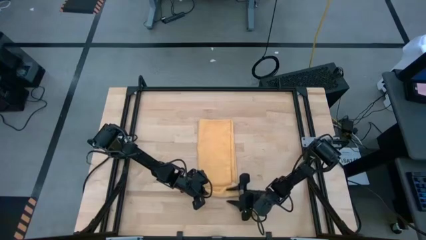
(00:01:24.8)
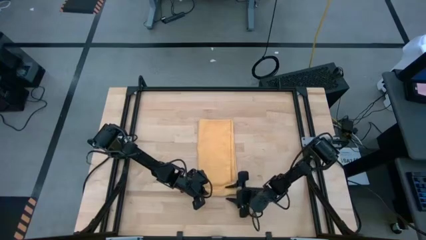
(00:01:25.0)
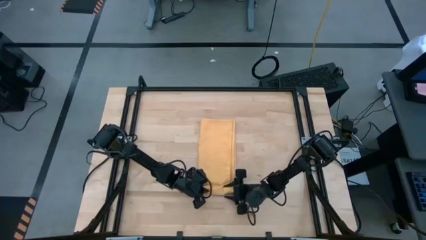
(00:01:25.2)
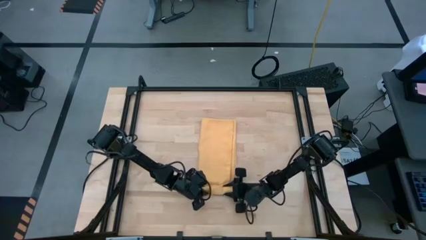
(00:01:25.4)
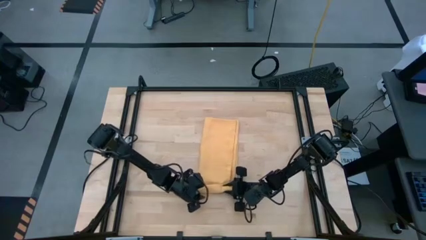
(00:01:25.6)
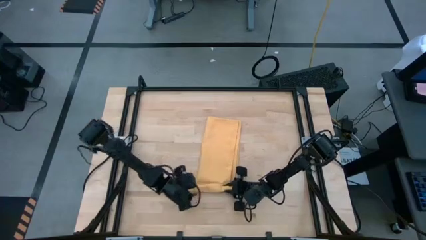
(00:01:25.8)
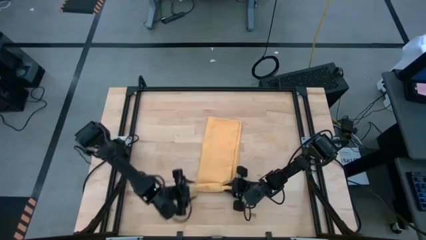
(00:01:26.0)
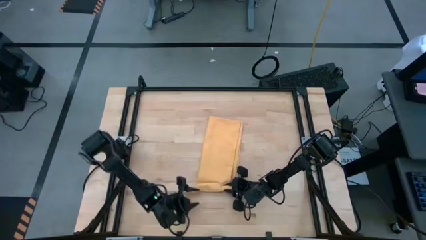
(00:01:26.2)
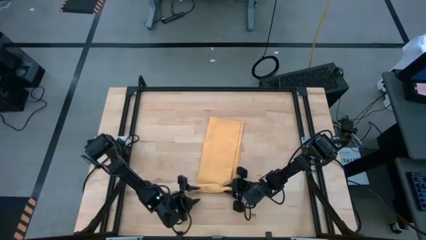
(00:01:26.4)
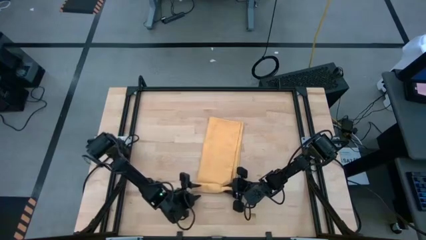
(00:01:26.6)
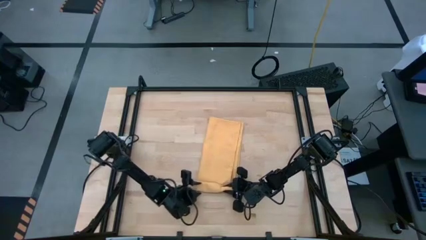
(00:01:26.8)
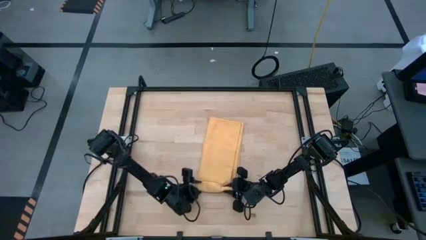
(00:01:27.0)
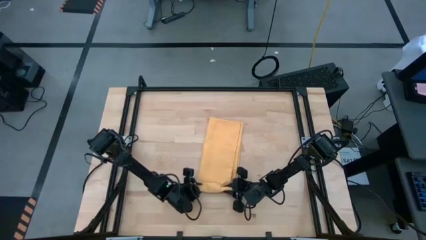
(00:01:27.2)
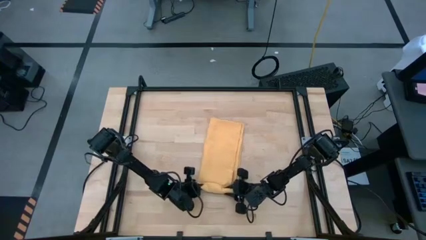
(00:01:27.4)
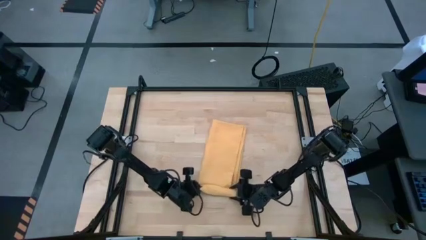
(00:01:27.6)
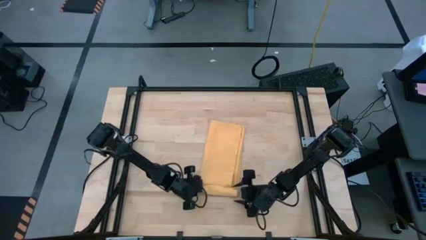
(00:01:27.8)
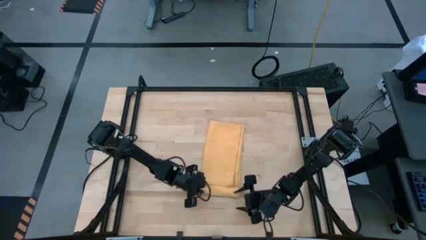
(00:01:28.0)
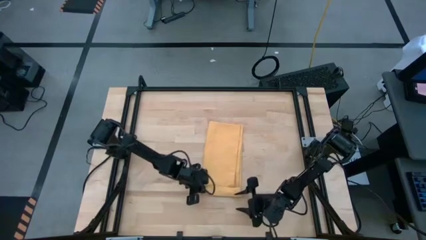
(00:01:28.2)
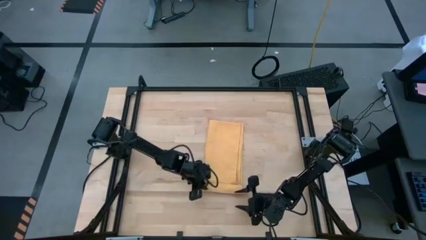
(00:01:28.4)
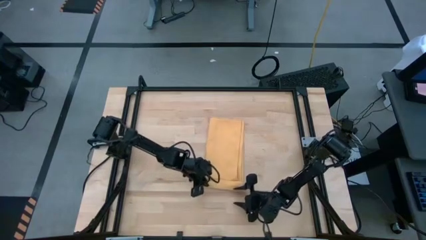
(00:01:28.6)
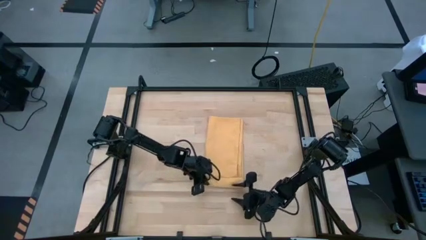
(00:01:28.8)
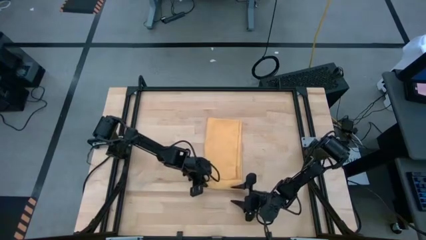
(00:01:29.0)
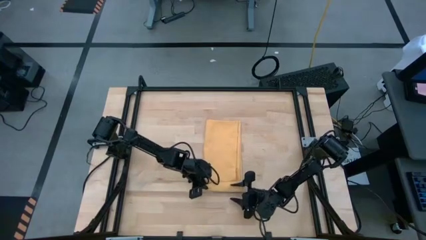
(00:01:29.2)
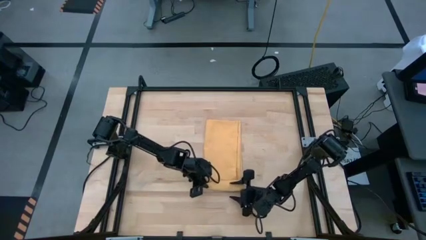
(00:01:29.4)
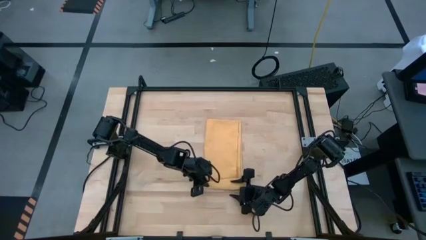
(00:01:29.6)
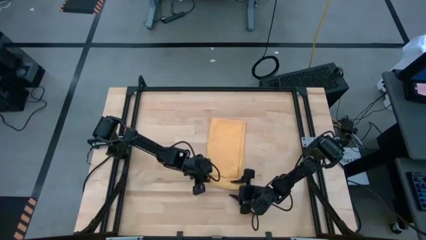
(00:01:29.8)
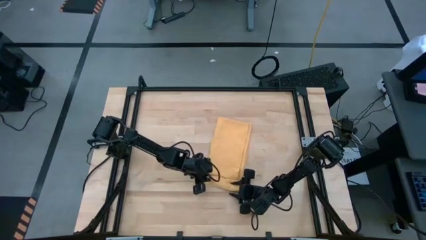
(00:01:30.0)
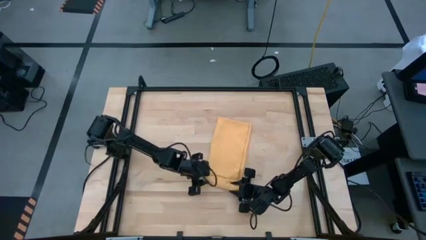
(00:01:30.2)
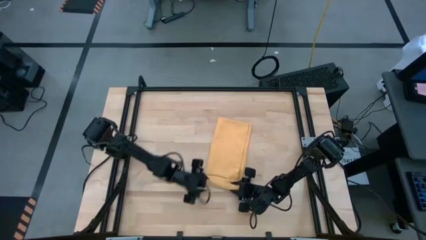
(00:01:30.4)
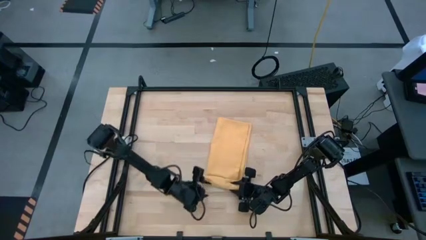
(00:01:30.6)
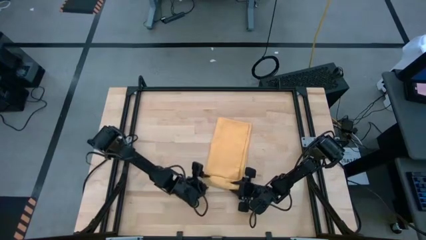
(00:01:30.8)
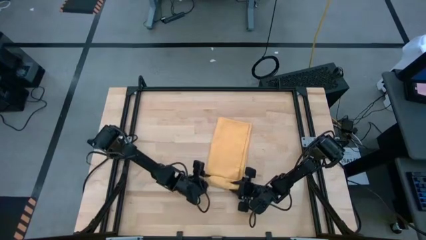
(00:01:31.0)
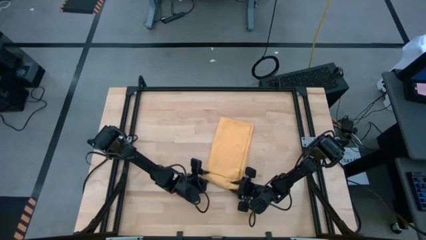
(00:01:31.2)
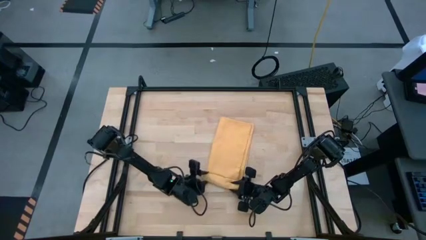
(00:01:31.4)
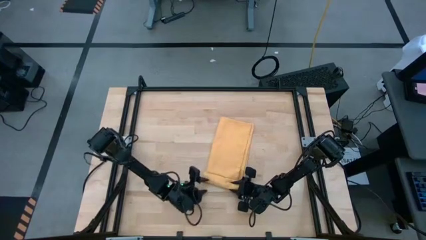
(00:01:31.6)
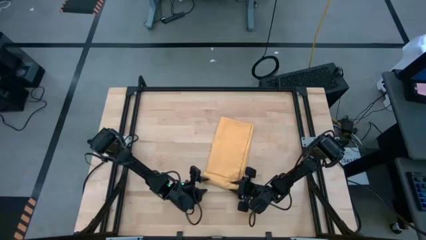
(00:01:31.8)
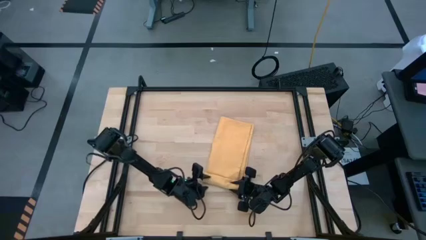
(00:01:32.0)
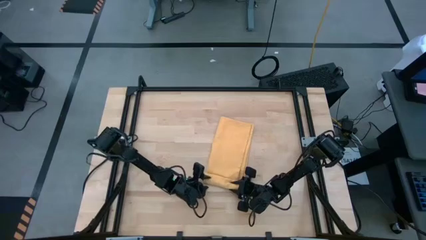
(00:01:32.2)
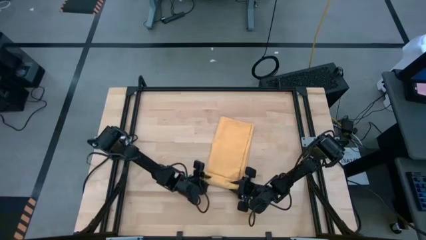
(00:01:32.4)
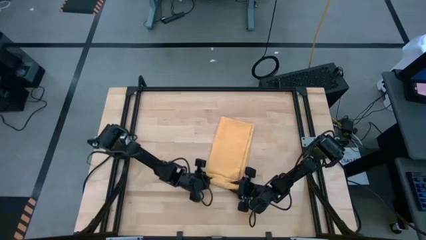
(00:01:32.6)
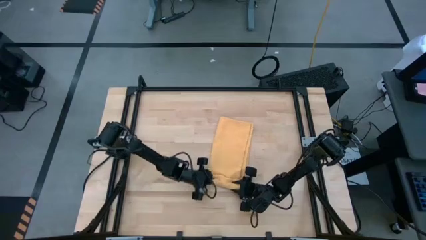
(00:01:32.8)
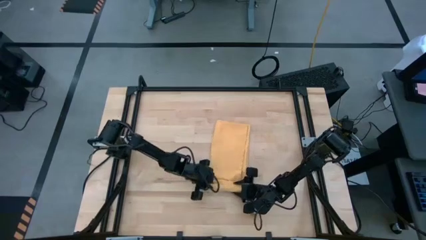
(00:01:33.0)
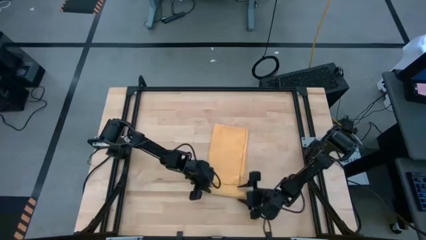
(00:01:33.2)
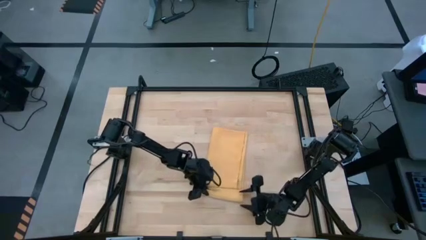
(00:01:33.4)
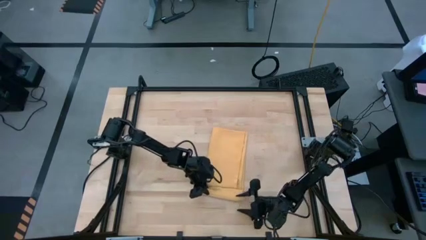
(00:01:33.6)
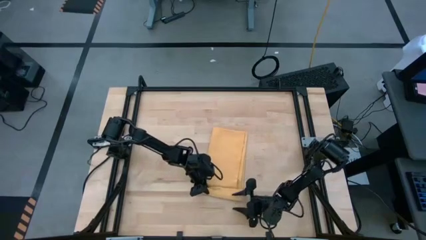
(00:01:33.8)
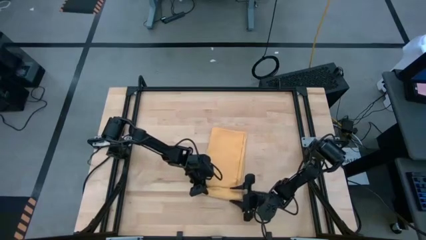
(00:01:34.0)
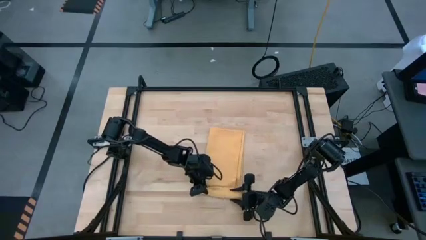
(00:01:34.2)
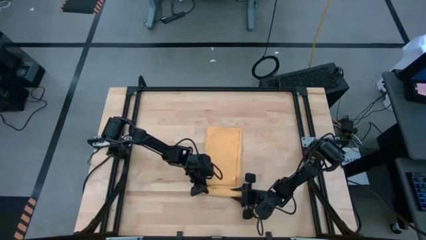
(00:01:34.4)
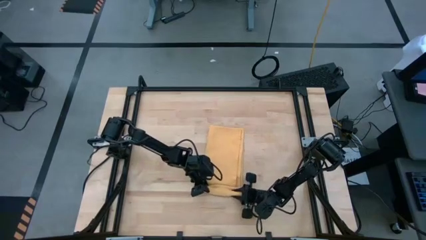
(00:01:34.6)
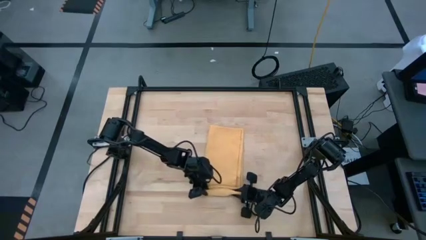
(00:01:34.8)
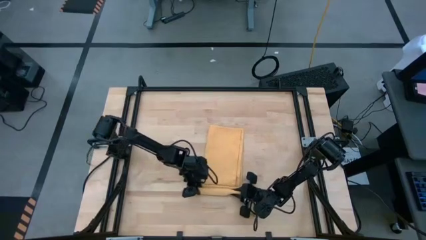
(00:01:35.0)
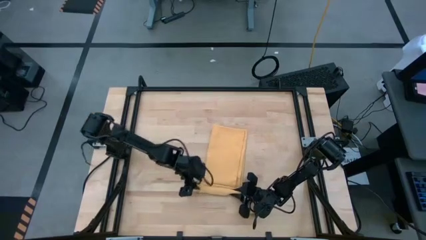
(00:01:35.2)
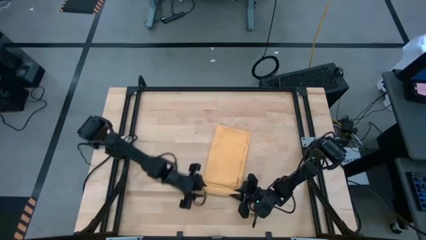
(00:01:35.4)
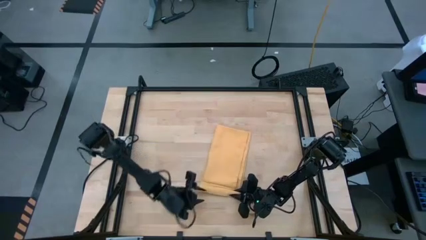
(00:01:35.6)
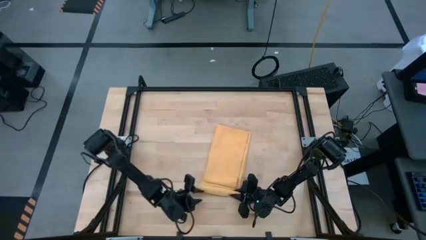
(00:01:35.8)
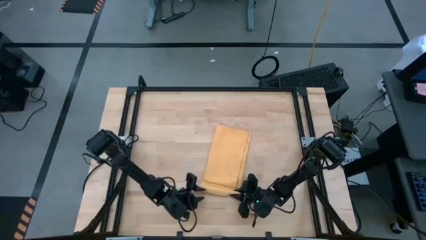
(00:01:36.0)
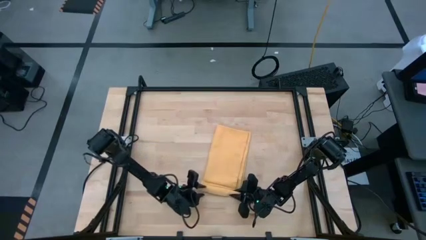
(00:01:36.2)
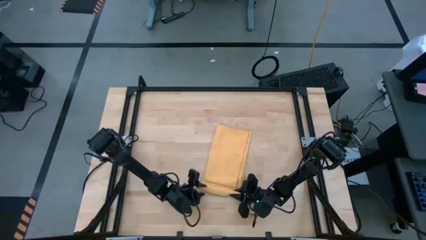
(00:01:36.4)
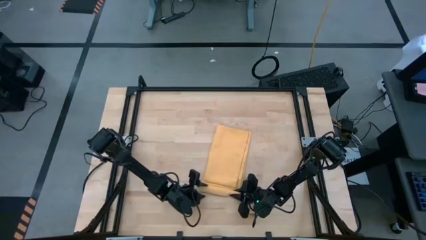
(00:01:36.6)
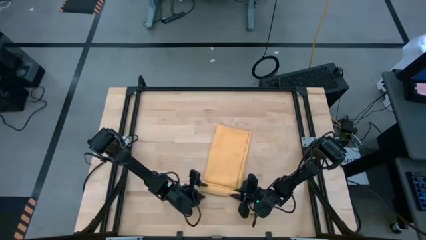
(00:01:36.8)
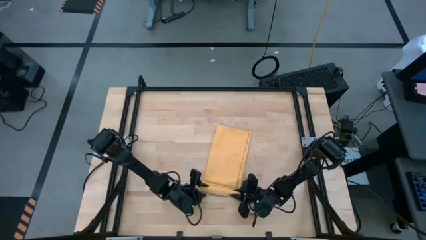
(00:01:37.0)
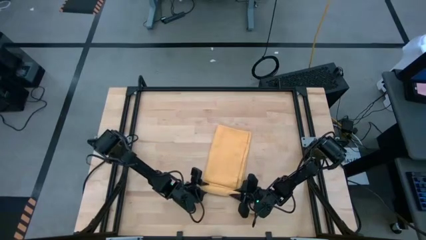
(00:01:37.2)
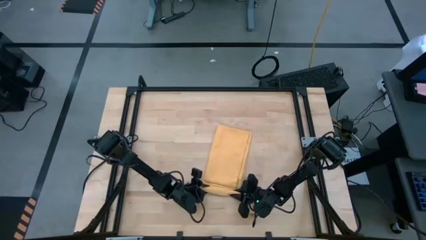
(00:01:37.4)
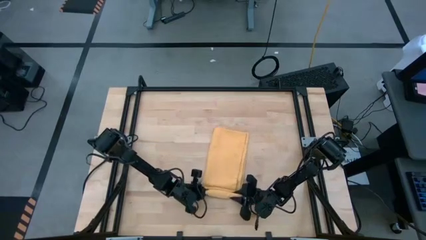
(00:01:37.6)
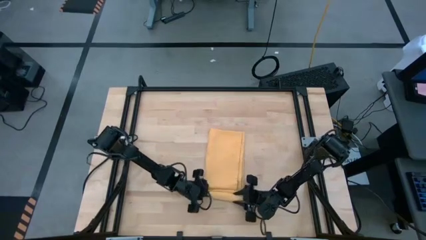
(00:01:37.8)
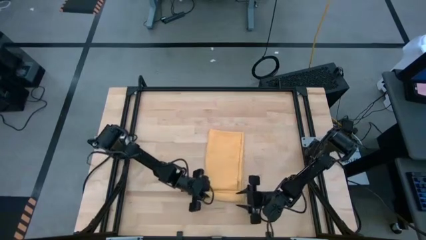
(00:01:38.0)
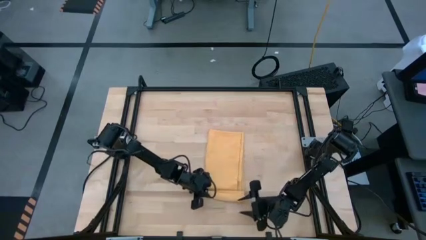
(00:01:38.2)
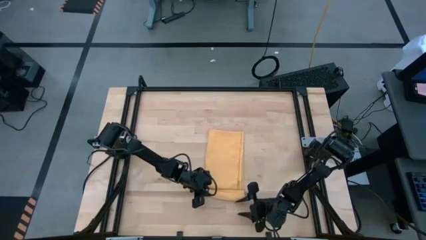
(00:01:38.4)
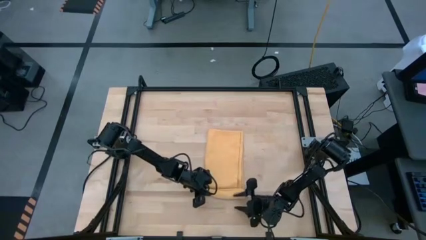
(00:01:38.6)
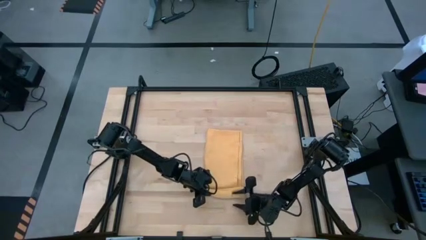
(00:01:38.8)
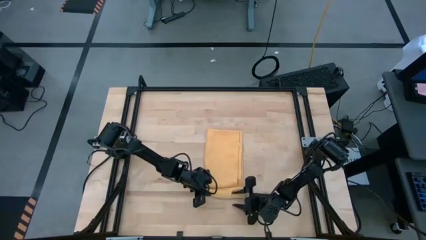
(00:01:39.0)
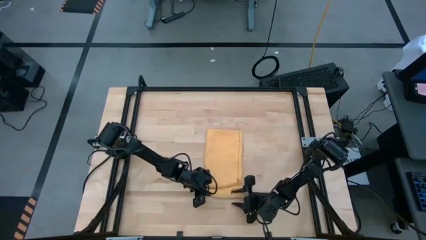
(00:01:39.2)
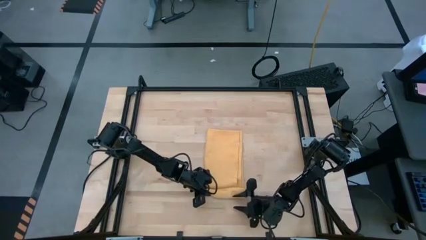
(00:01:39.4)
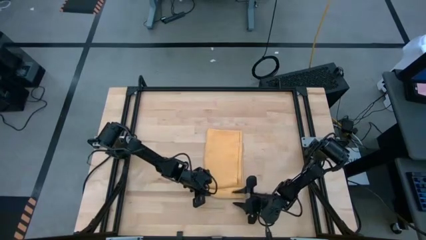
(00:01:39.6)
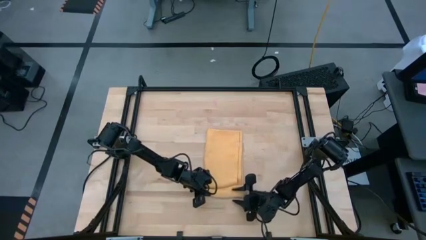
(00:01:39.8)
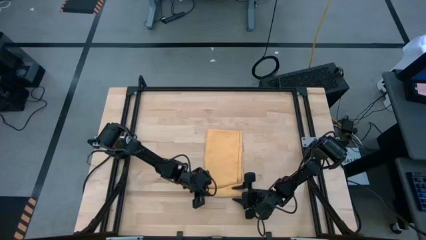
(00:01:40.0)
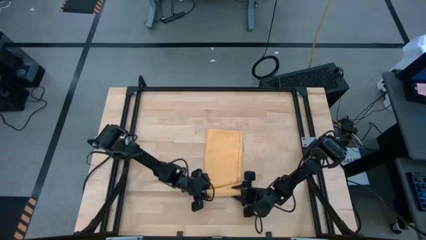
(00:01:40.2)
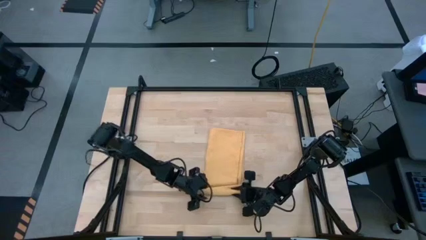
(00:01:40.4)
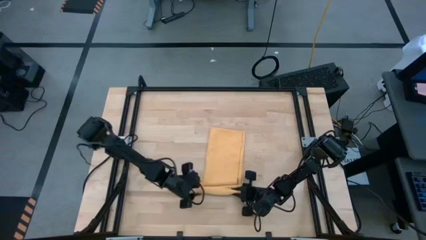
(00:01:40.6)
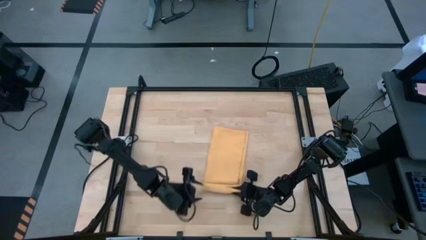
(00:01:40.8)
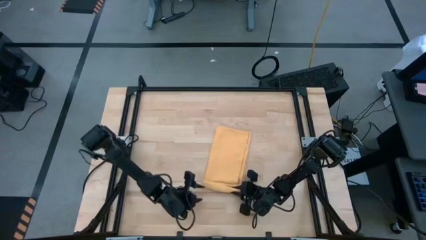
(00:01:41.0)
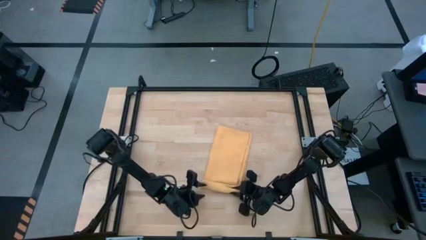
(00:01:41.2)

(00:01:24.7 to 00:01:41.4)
Task: Roll towel
Roll the yellow towel
